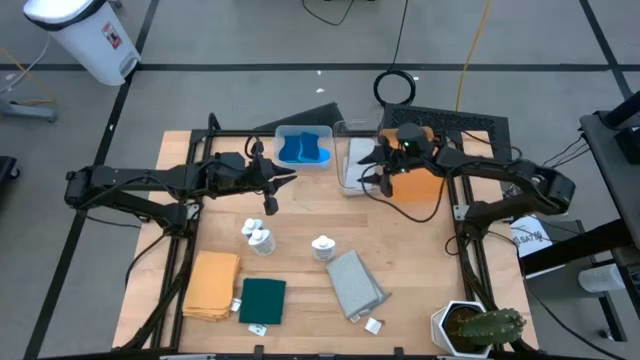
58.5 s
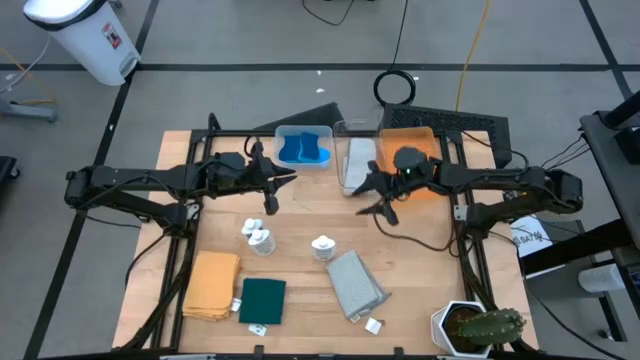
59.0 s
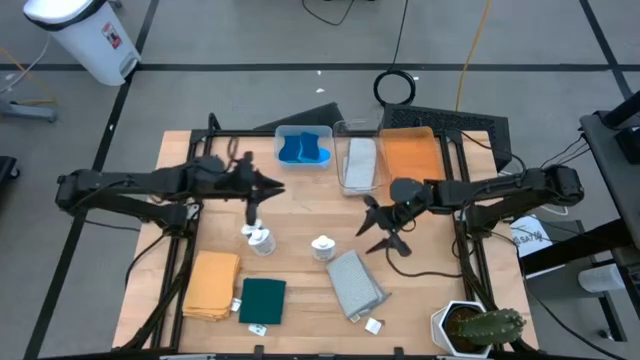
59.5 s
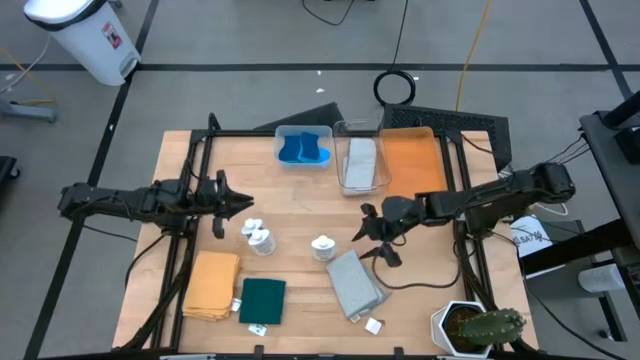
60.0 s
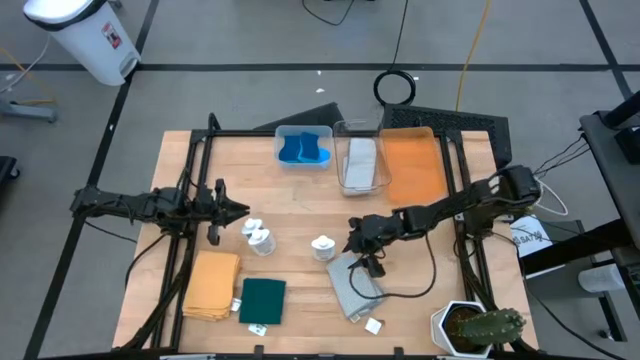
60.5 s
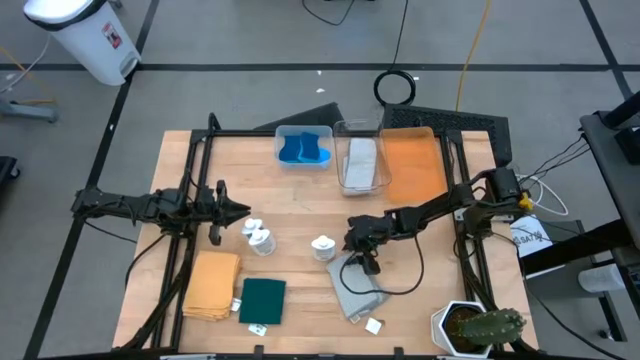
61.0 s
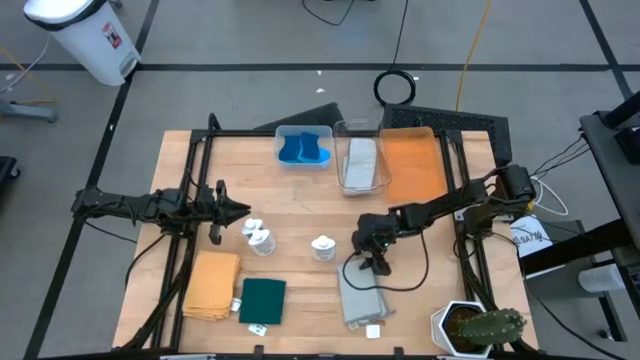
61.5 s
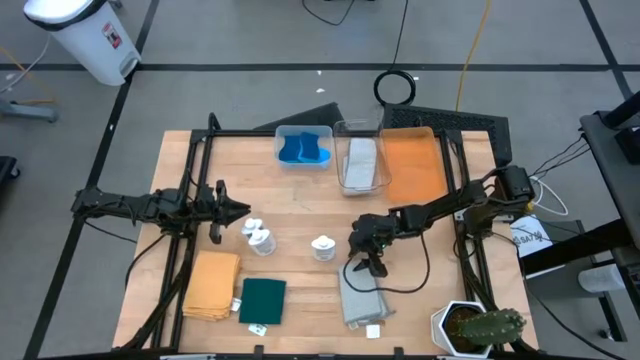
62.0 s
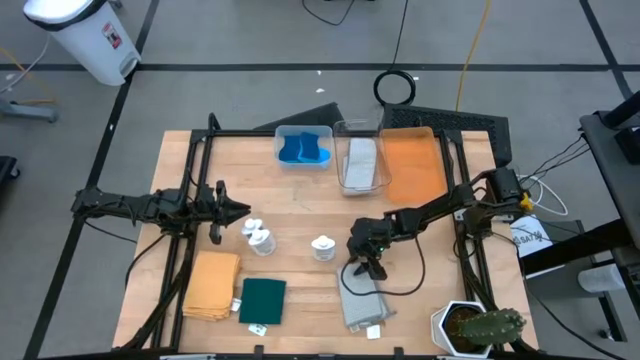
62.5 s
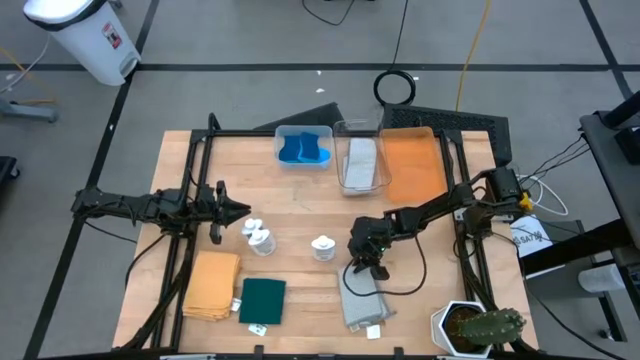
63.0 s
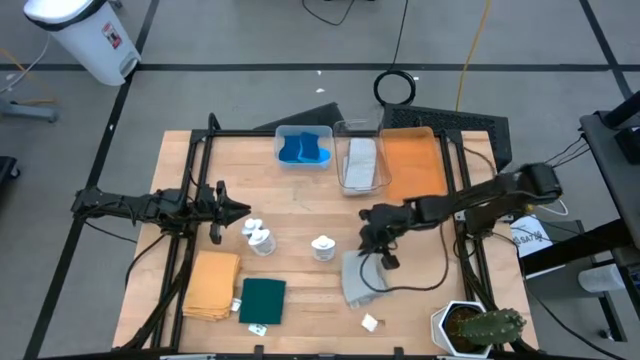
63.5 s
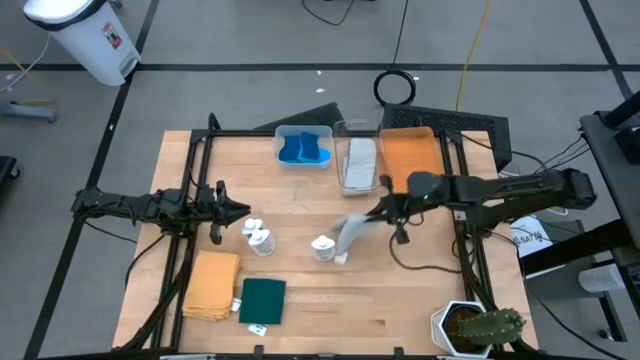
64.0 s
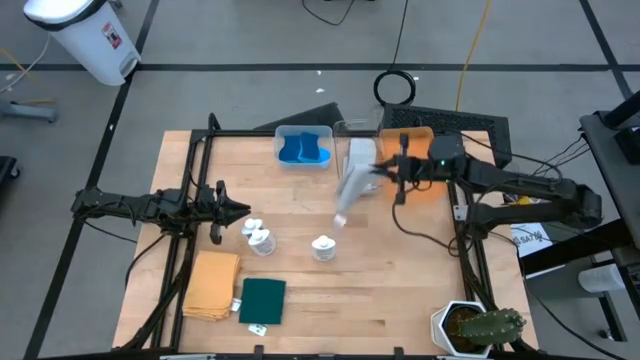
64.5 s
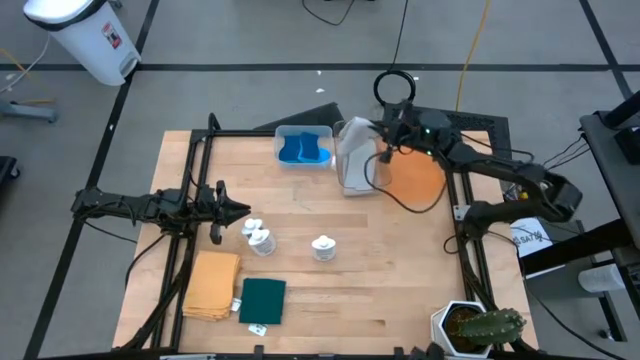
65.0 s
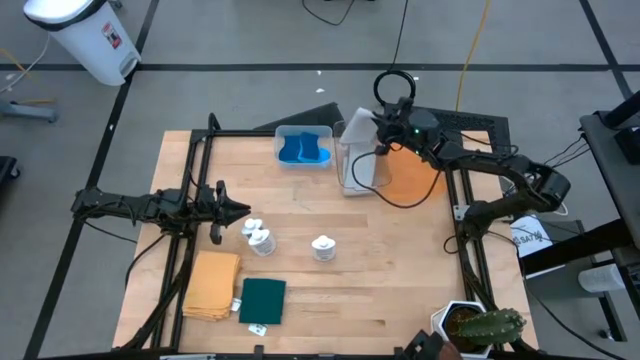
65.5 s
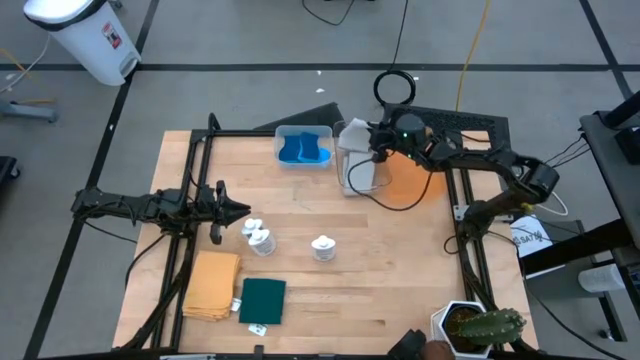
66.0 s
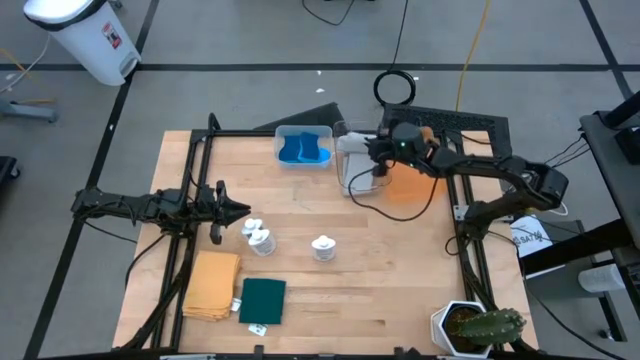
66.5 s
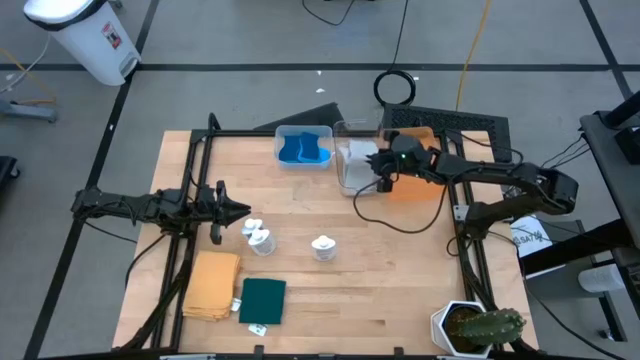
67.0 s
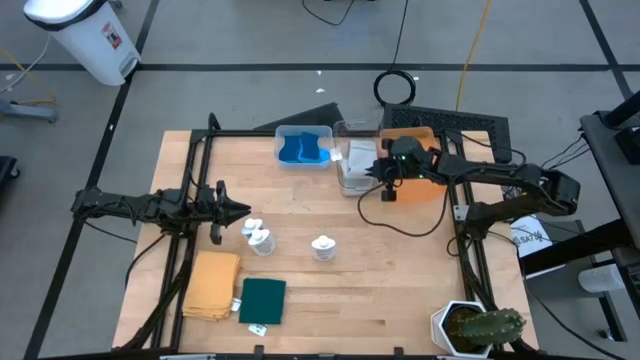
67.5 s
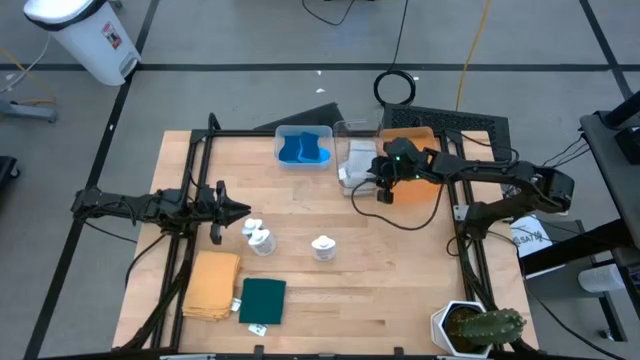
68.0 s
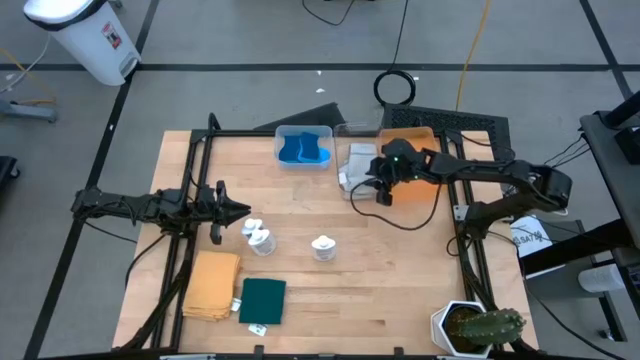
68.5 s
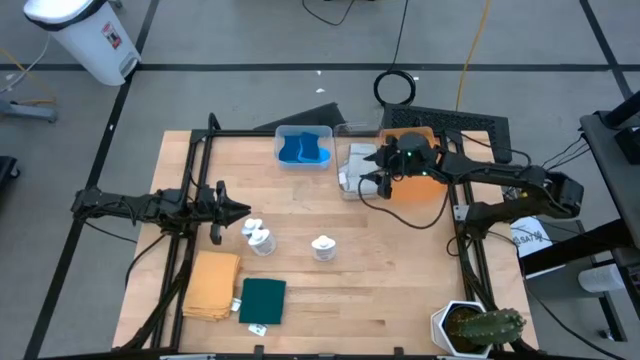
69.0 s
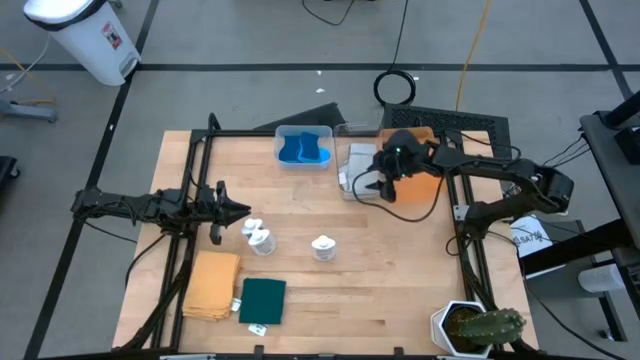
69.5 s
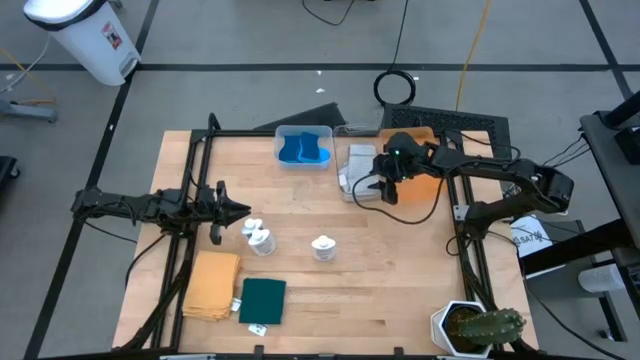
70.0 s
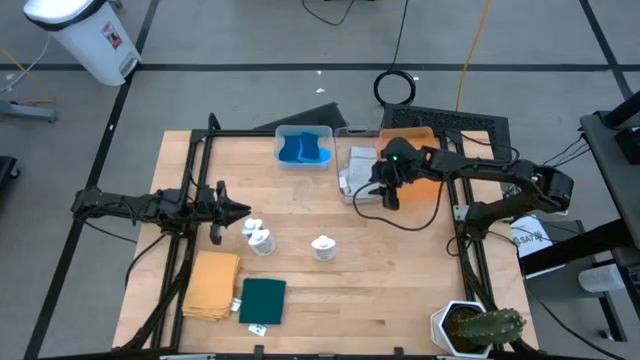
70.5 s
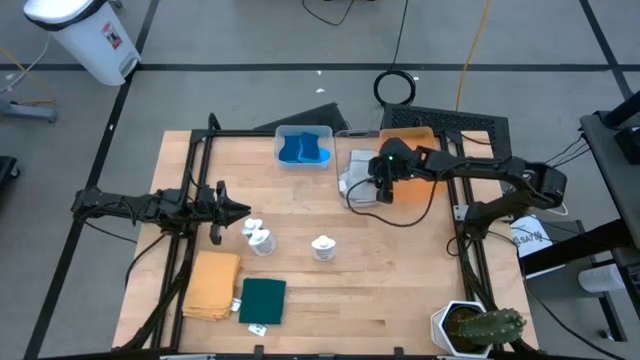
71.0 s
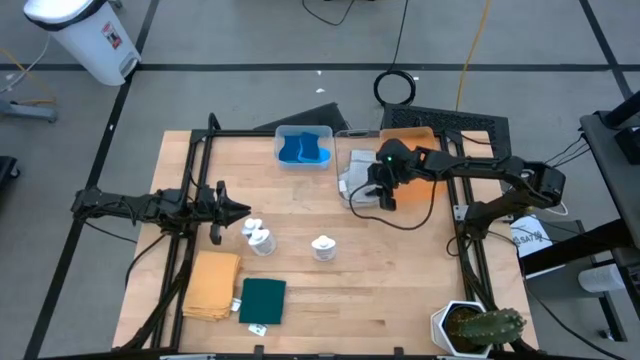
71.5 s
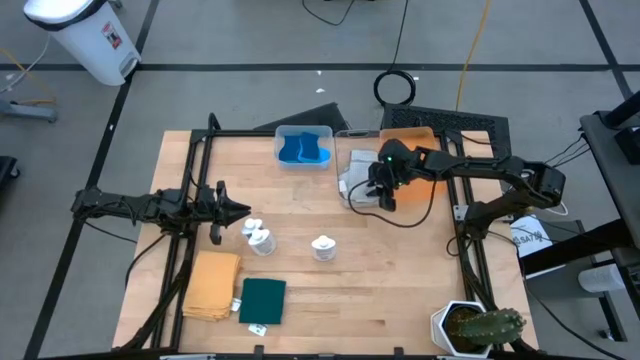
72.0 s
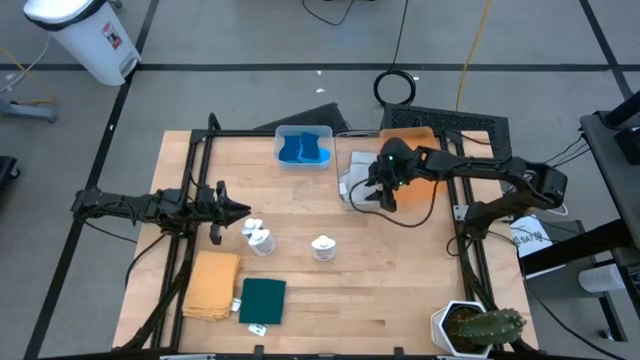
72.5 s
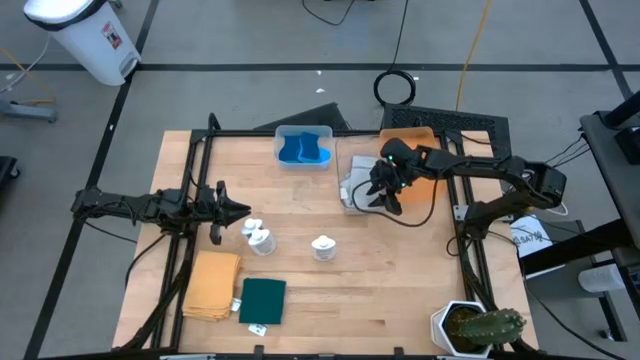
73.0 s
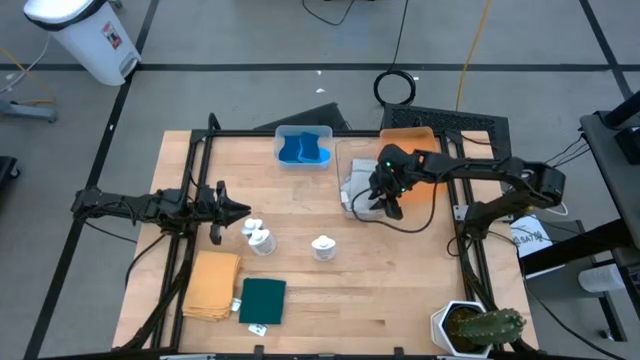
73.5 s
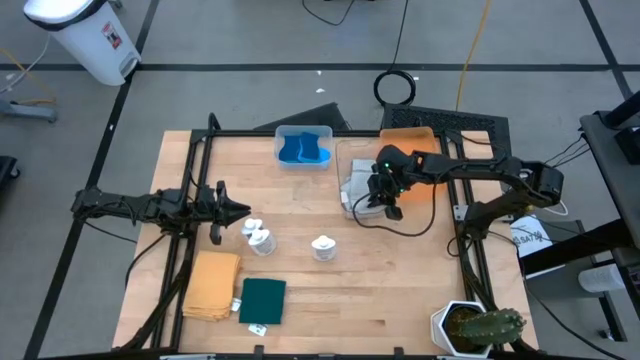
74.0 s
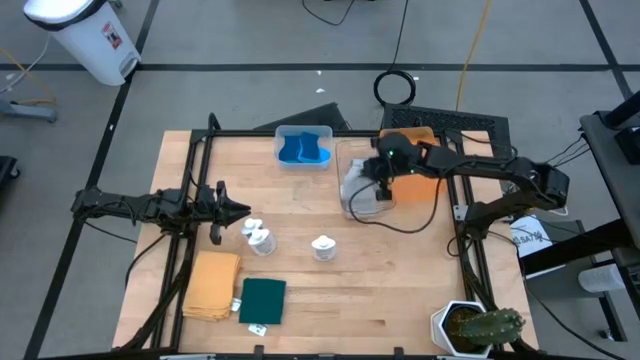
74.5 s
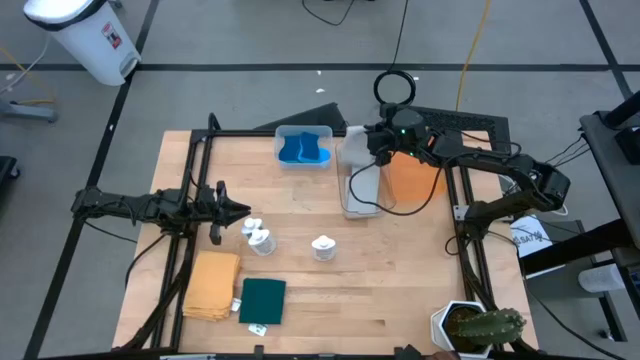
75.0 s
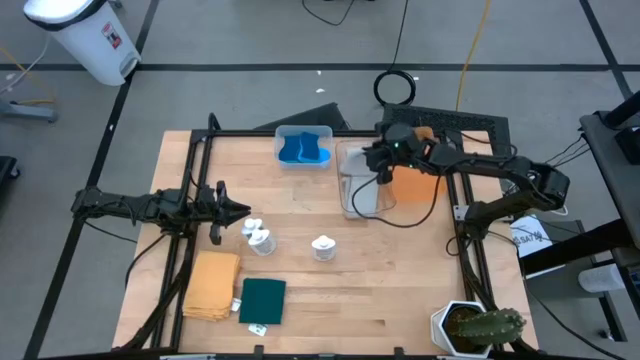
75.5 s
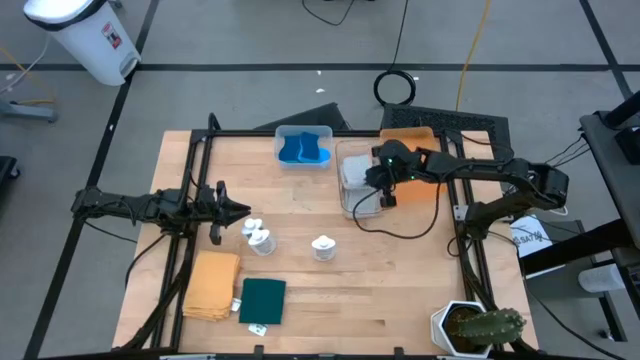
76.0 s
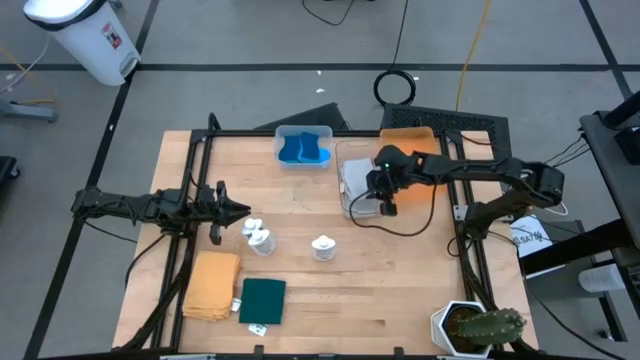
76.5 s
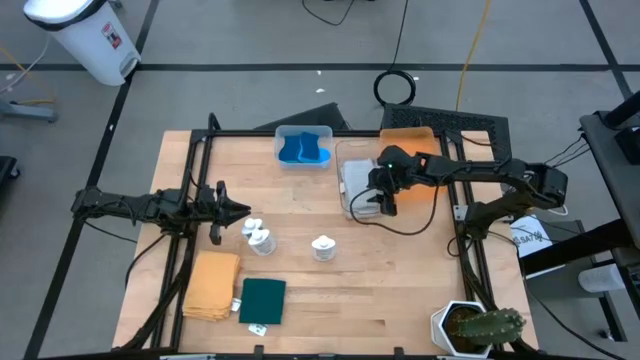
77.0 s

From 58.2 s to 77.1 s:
Task: Pick & Place Kitchen Items
Put the gray towel into the transparent bin

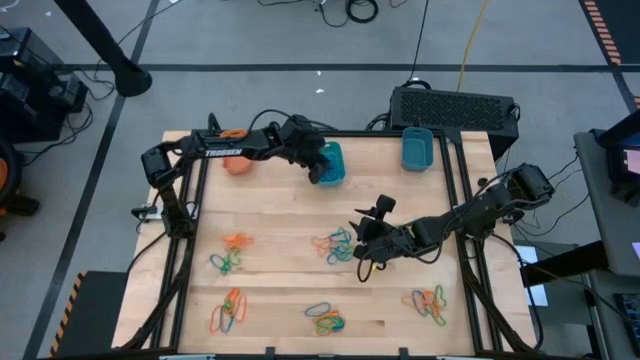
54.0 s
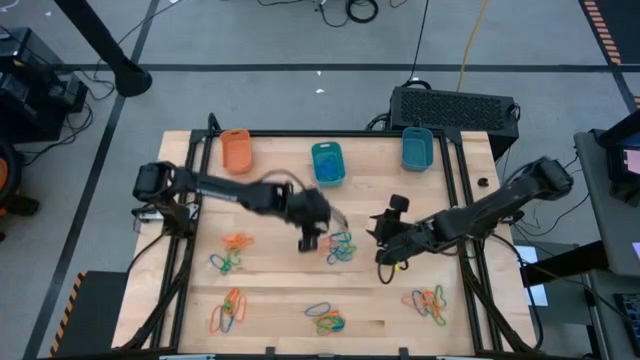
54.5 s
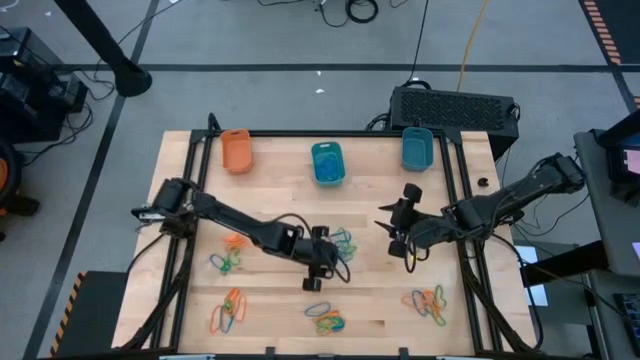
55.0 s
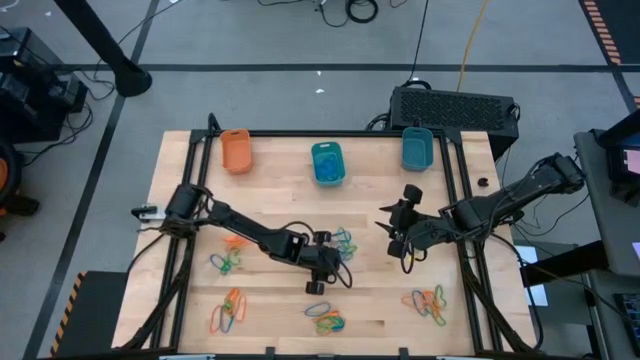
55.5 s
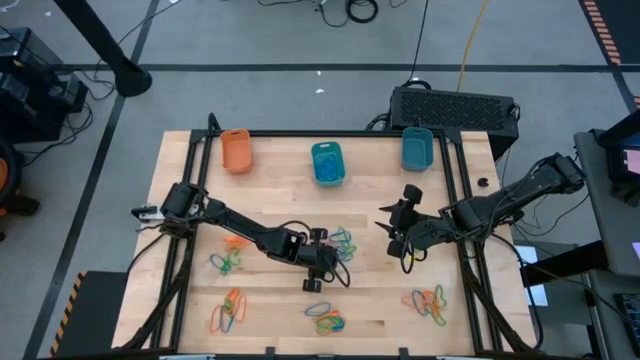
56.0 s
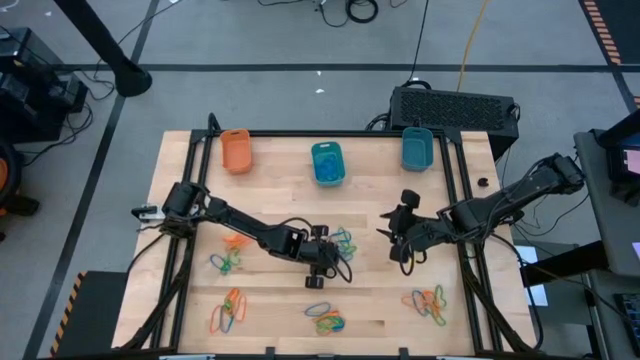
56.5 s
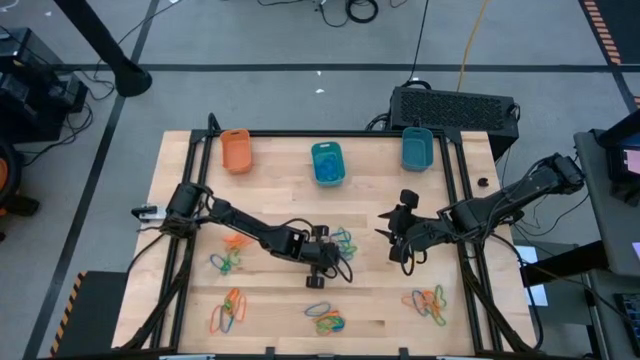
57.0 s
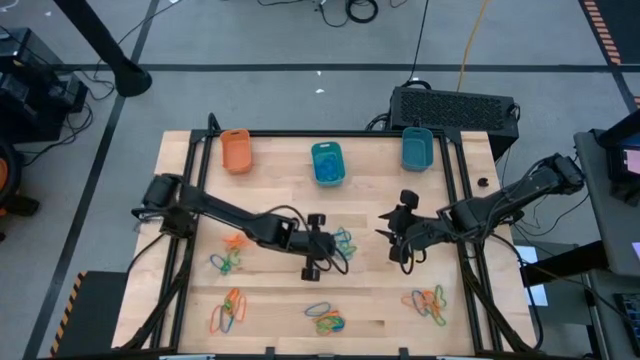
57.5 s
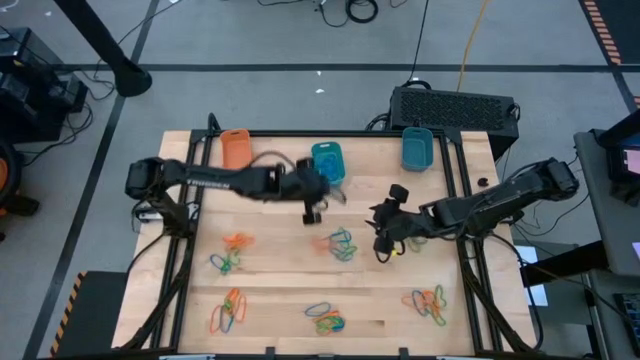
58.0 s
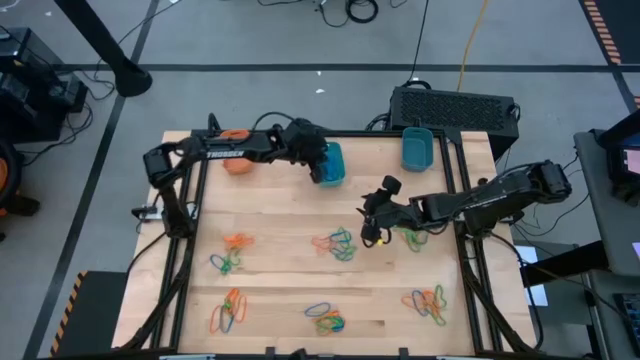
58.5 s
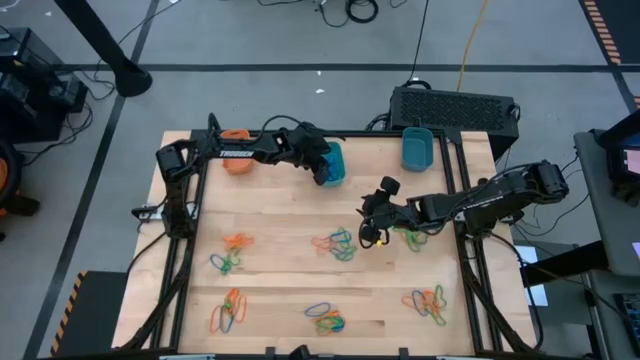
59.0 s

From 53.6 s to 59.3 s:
Task: Sort rubber bands into baskets
Put the blue rubber band into the light blue bin
